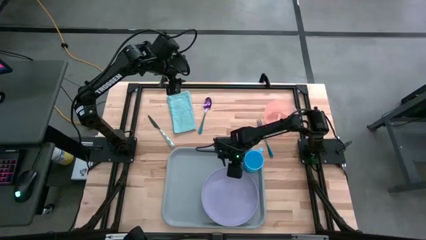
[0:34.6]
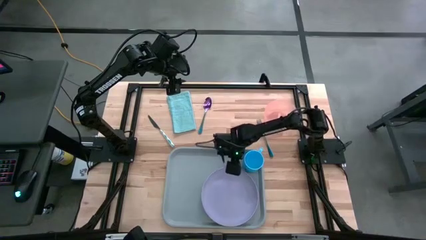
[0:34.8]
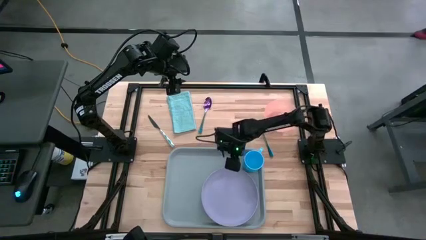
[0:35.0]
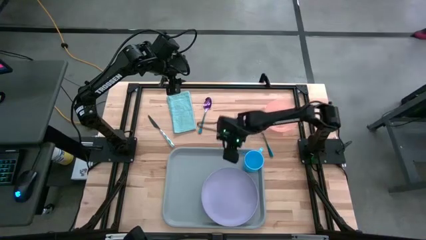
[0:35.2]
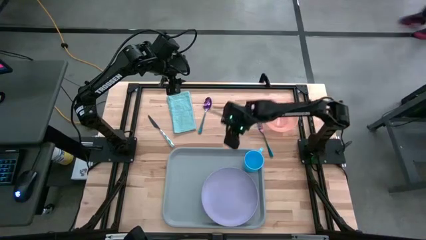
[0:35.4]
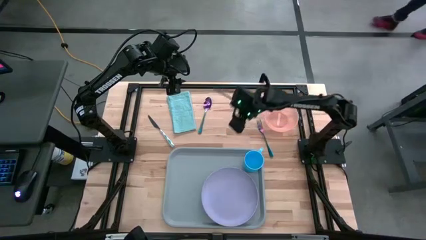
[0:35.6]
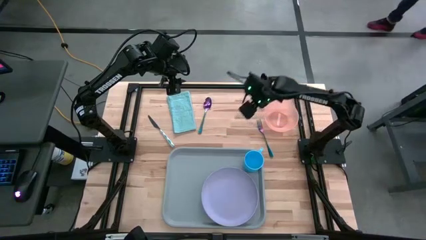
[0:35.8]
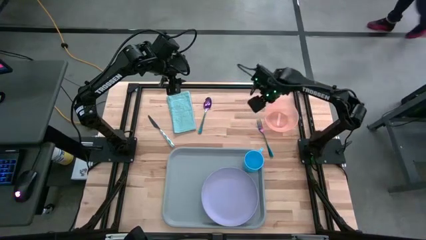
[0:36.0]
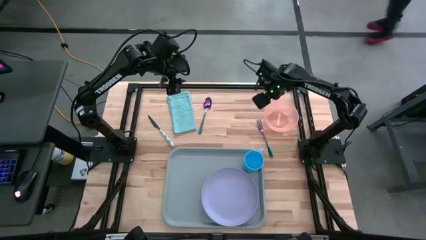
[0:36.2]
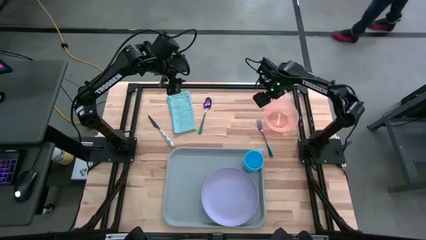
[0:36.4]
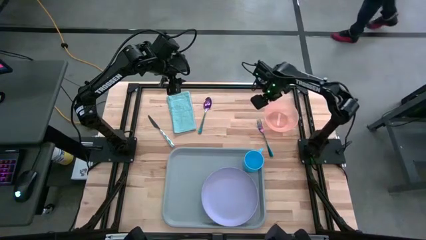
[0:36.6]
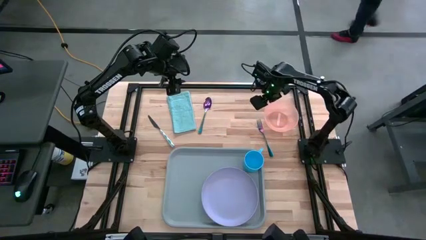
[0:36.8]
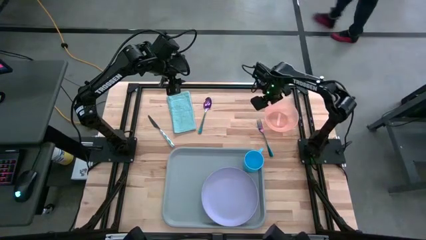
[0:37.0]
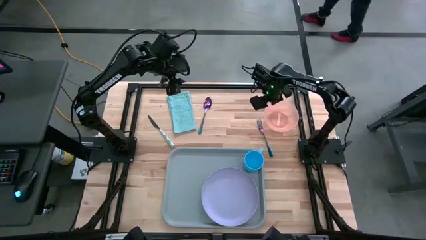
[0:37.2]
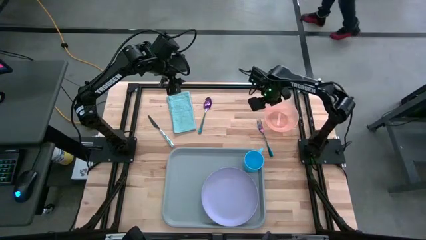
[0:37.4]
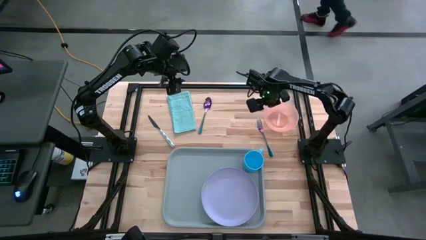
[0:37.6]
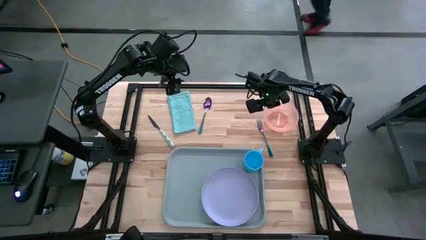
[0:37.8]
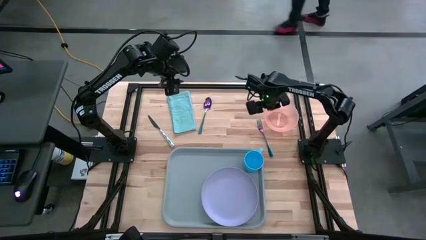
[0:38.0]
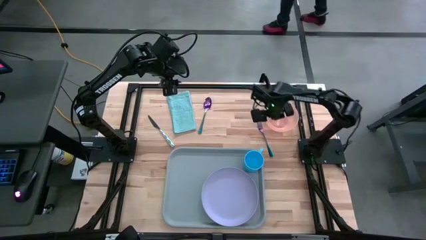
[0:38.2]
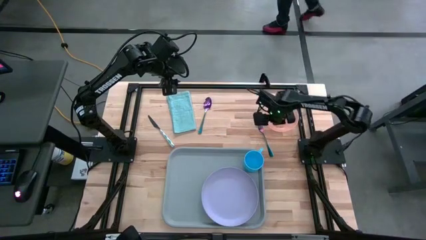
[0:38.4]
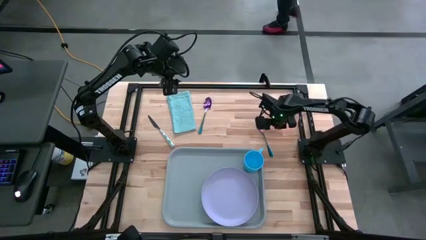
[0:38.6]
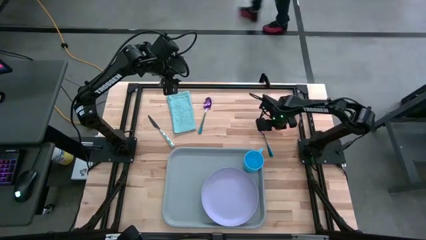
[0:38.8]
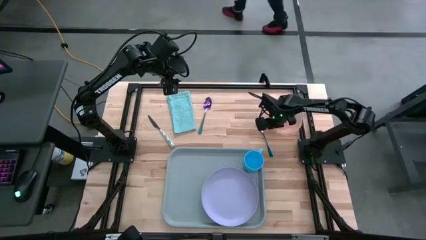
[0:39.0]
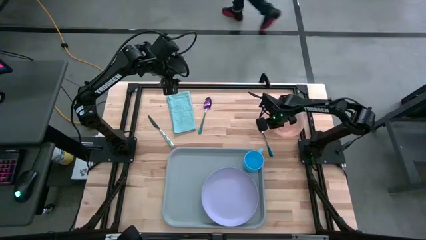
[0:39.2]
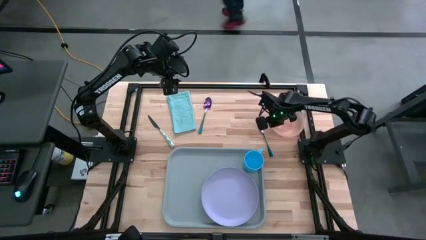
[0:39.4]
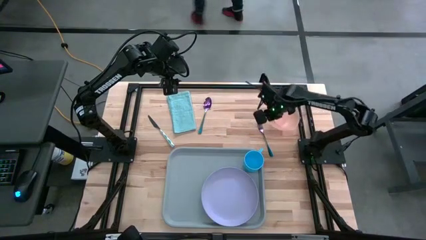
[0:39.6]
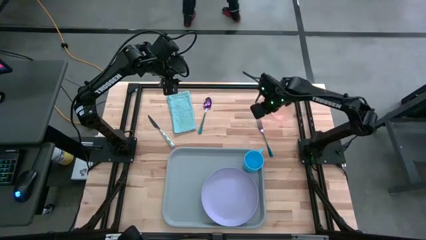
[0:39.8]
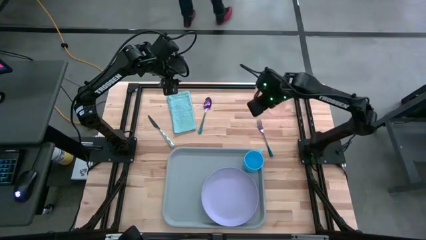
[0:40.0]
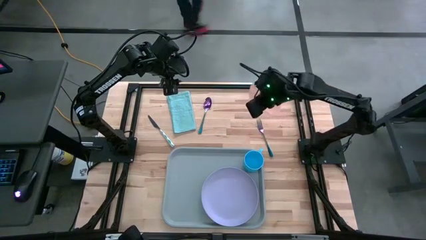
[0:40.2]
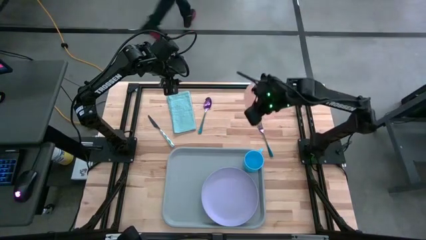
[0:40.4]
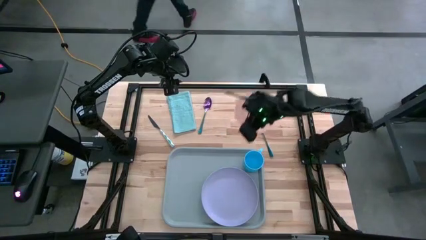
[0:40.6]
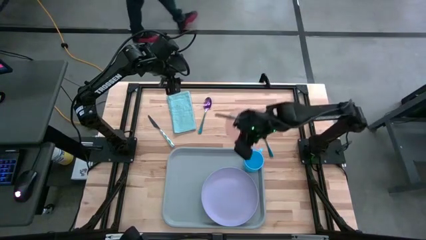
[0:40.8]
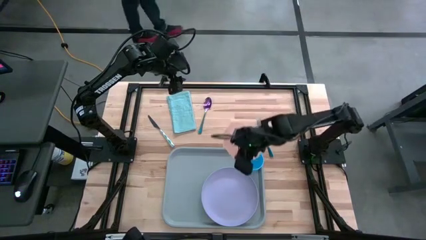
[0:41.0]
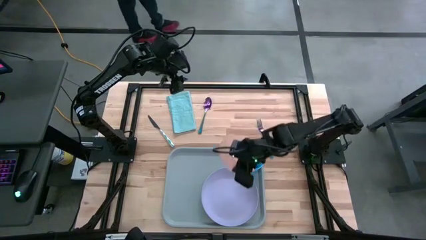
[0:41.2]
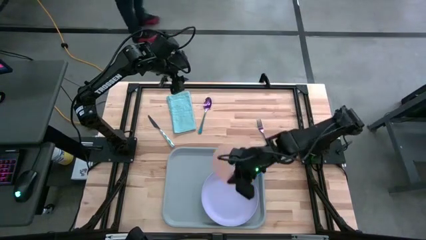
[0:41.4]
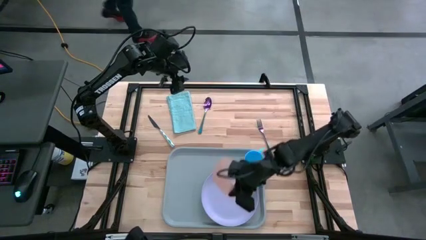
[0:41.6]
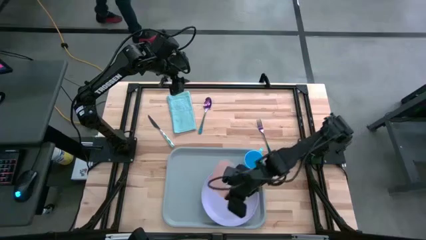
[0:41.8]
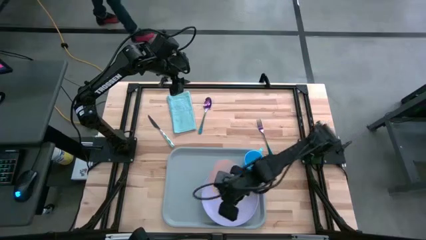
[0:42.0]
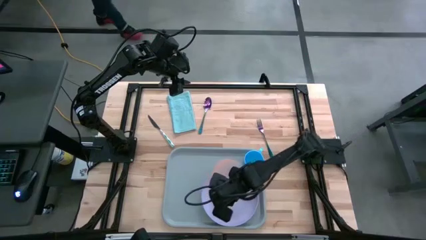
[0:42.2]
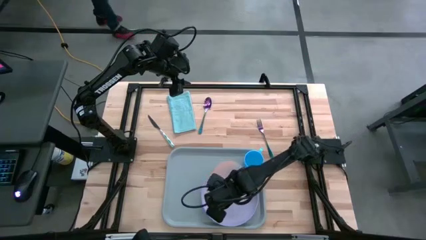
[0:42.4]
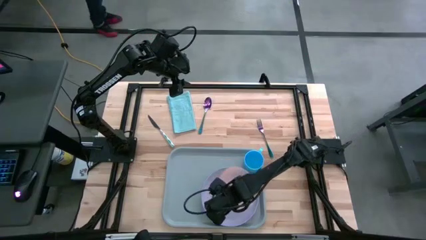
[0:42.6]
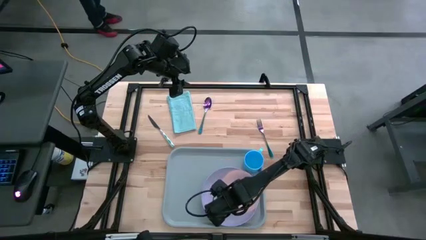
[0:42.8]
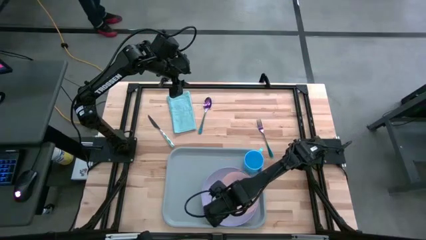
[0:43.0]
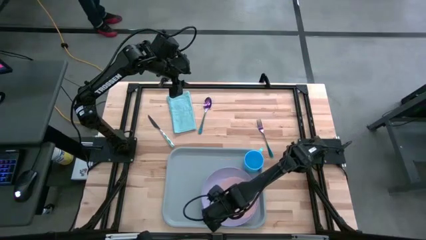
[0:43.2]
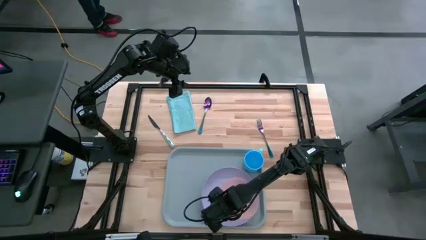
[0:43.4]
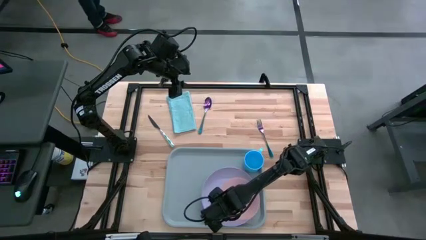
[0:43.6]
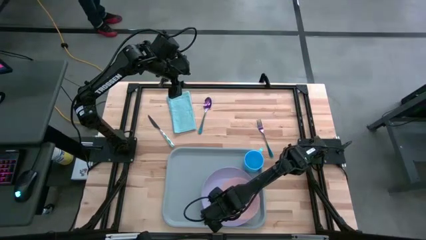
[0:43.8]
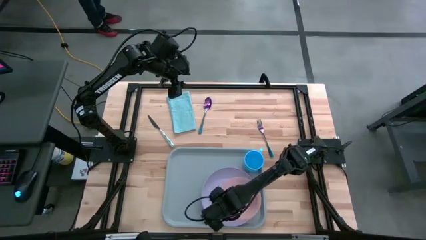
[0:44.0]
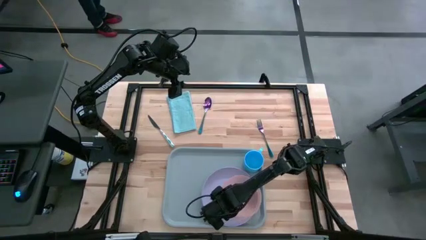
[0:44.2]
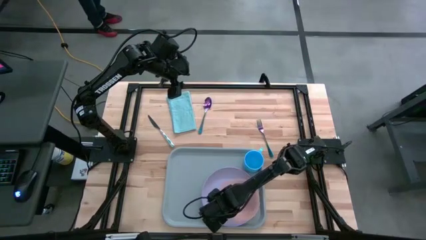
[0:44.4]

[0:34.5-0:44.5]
Task: Set up tray
Put the orange bowl on top of the purple plate on the gray tray

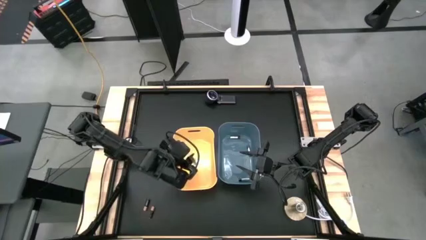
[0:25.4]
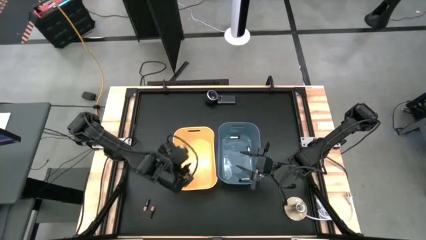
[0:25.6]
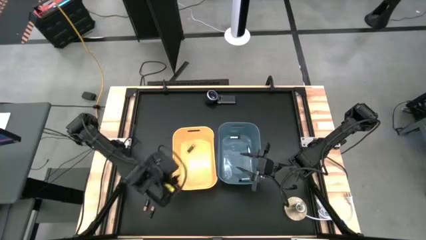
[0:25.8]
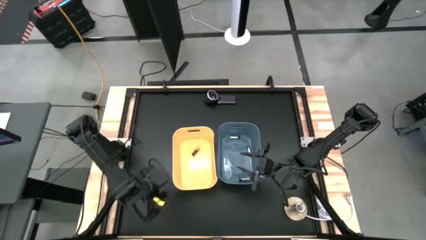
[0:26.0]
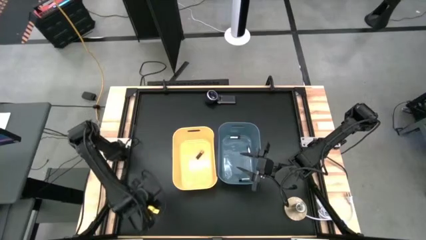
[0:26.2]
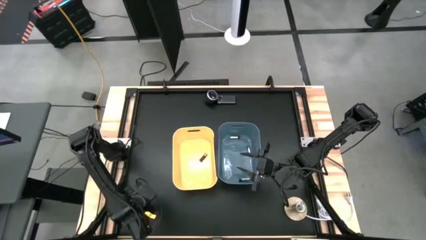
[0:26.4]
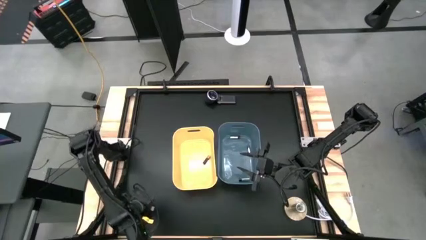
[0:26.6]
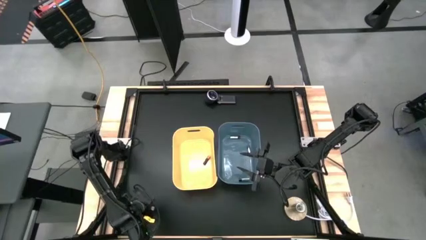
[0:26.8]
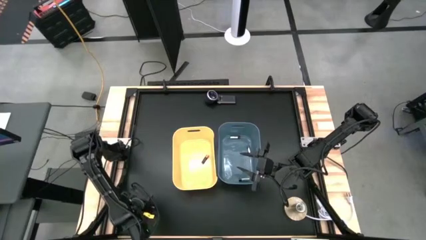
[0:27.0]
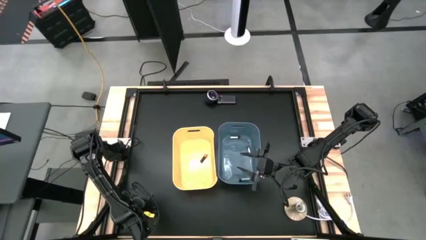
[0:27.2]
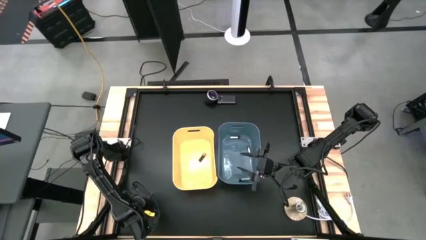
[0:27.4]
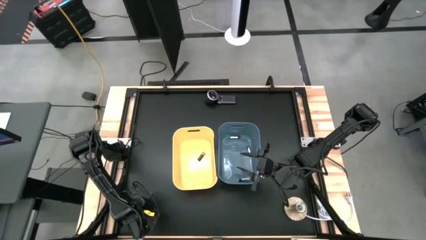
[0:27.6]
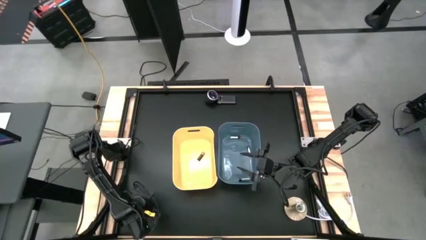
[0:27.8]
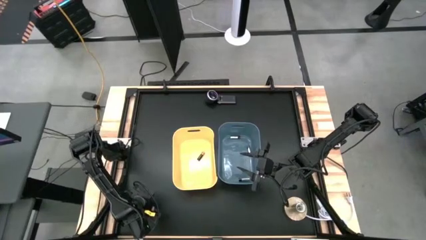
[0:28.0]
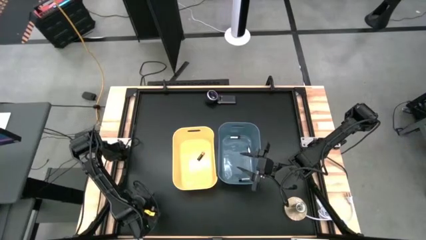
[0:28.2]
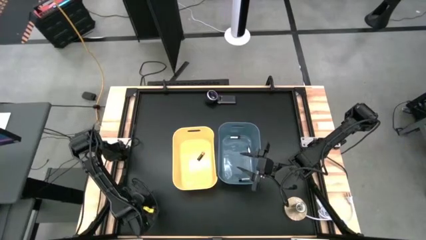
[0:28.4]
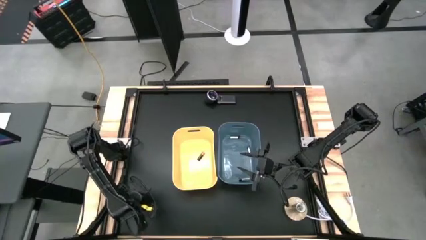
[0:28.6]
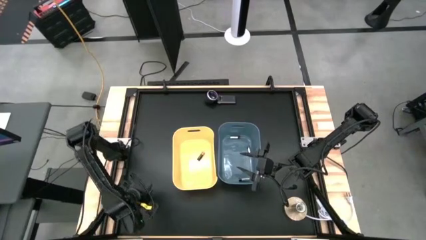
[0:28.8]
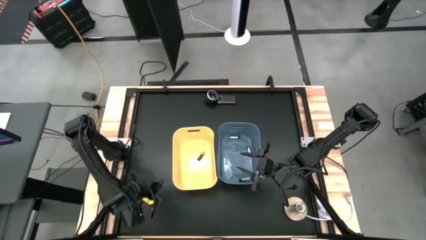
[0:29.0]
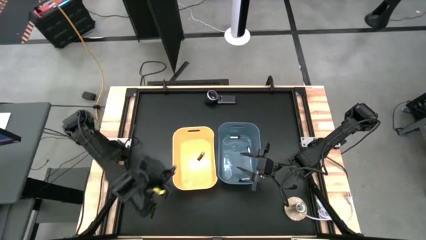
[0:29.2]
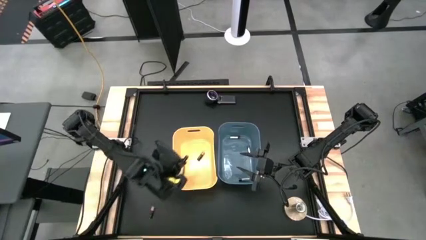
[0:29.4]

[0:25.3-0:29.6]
Task: Sort batteries
Put the left black battery into the yellow bin

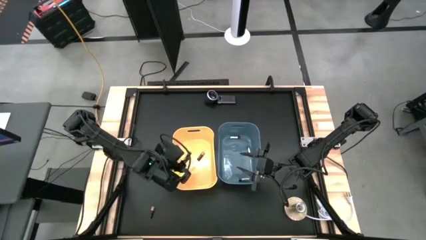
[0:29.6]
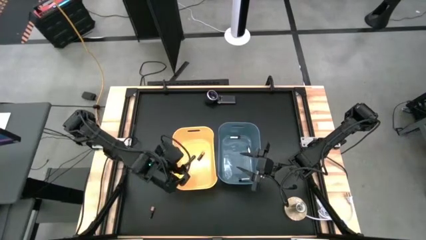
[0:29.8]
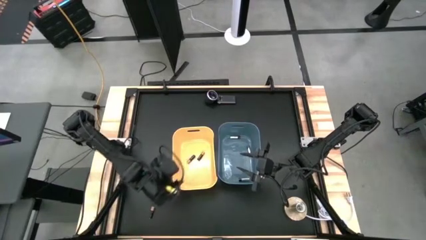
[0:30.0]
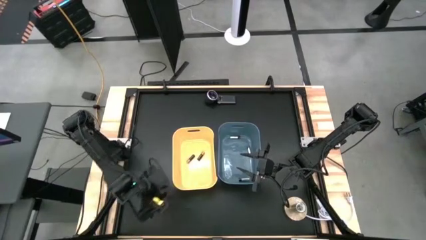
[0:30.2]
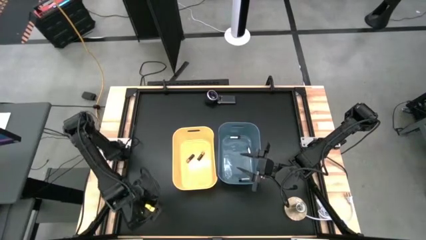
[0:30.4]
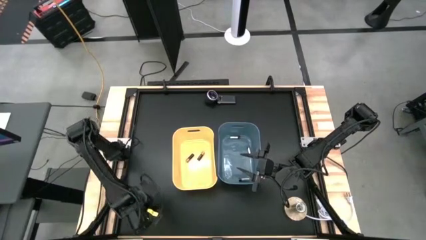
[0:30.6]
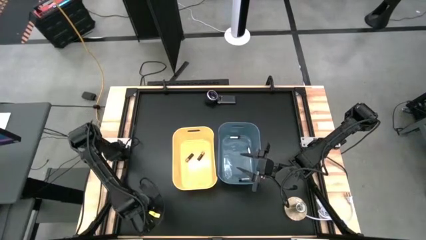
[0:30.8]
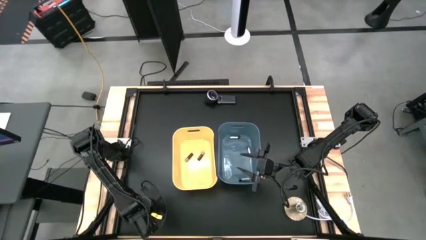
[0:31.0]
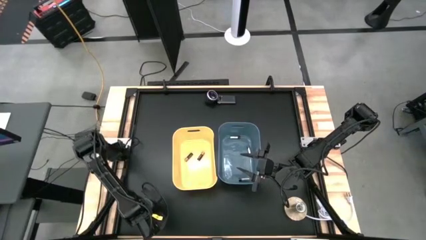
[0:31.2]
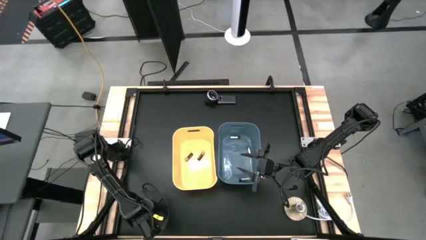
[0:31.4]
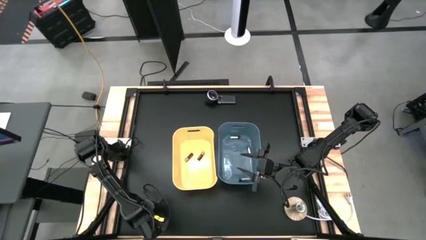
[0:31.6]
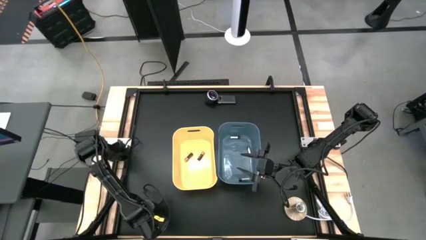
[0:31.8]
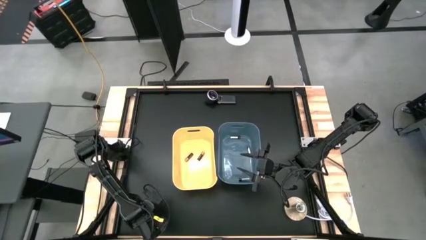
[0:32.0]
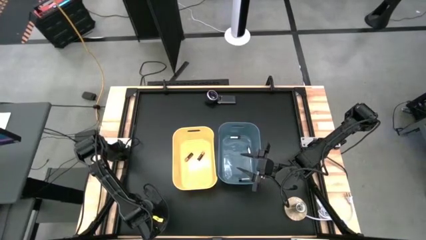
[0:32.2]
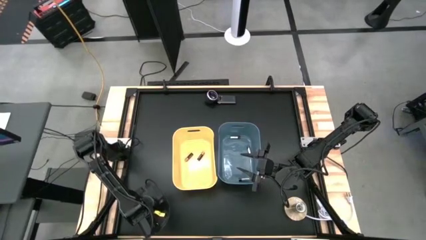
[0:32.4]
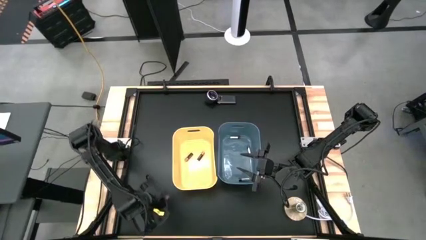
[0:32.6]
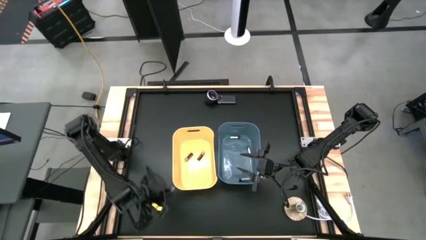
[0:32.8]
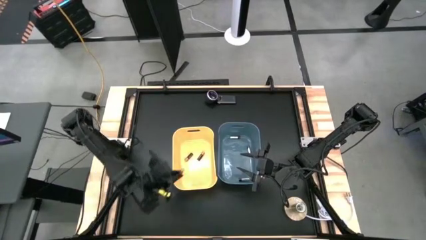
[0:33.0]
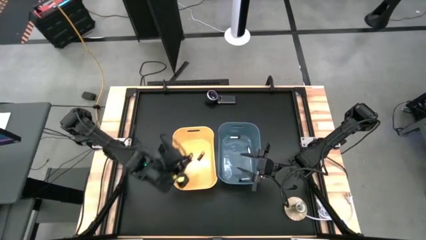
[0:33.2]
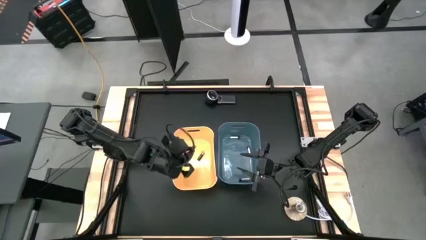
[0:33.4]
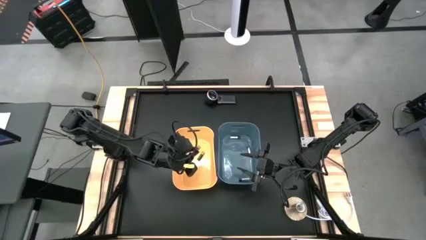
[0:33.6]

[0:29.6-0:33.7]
Put the black battery into the yellow bin
